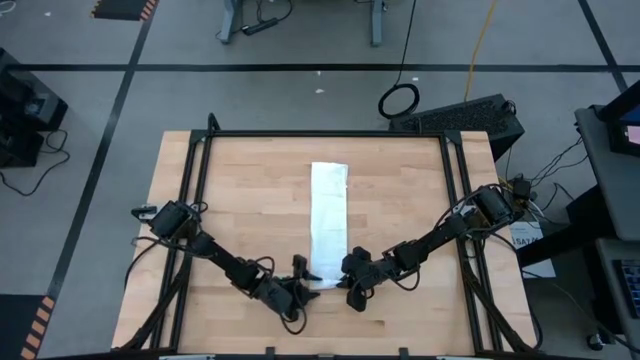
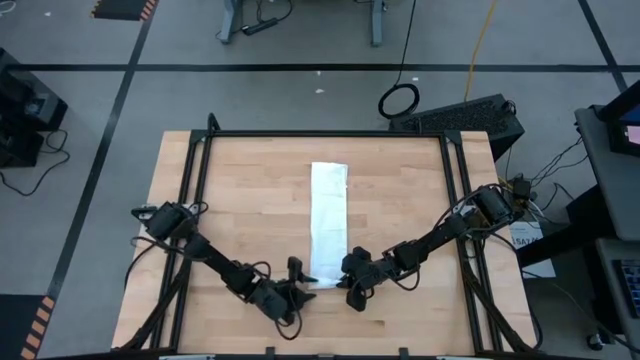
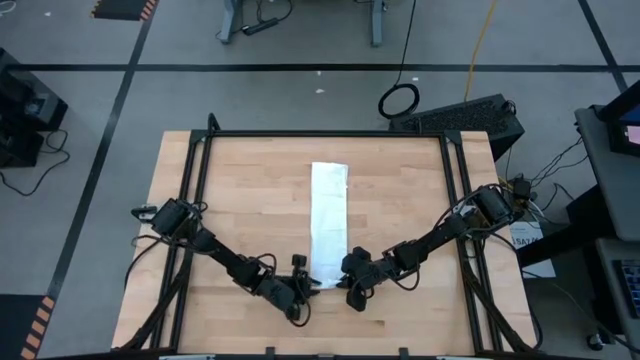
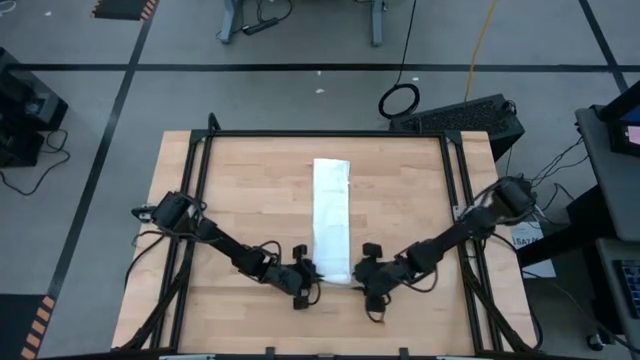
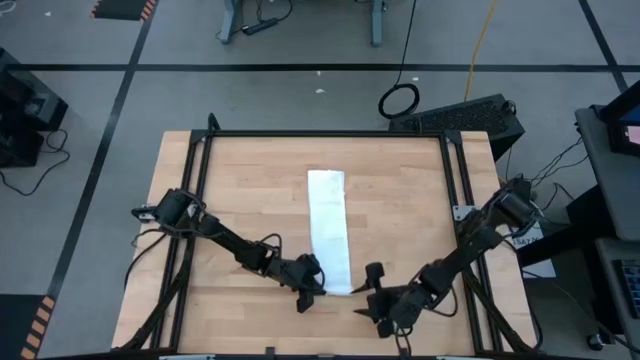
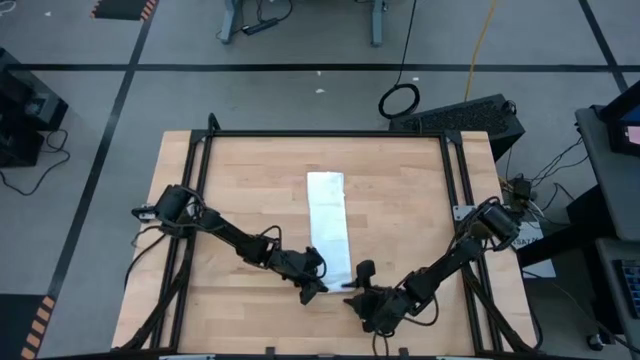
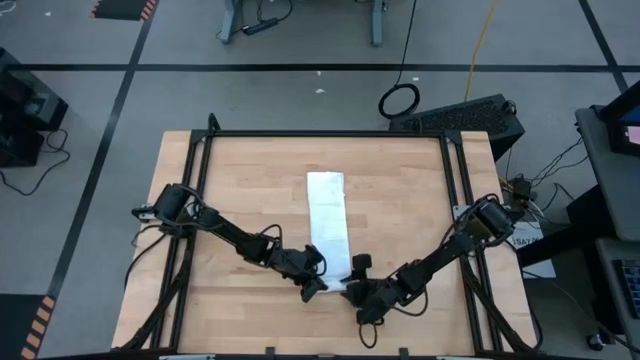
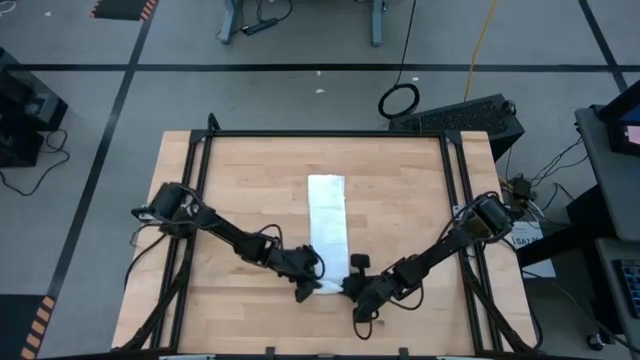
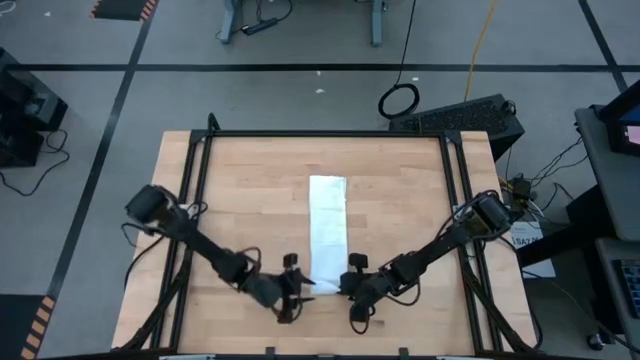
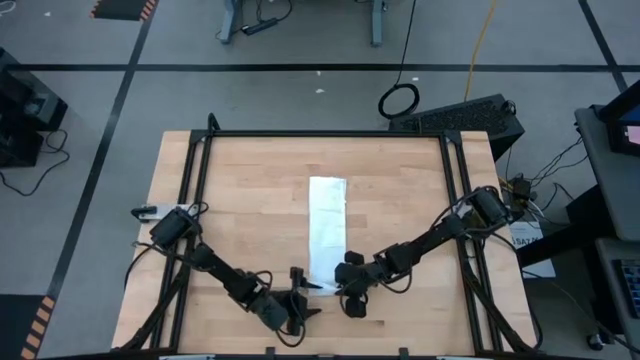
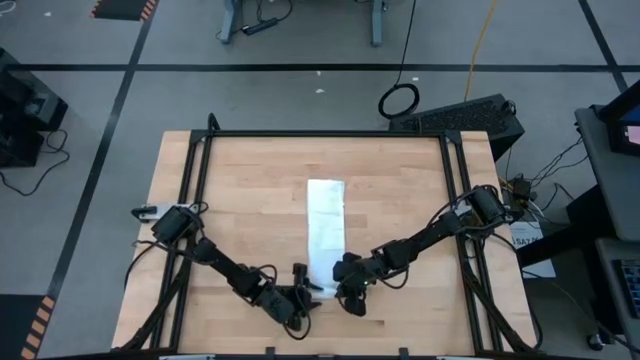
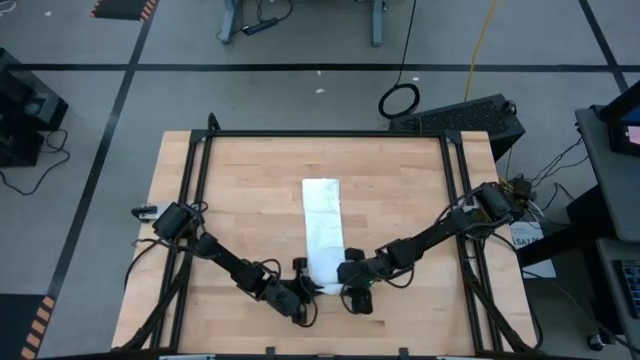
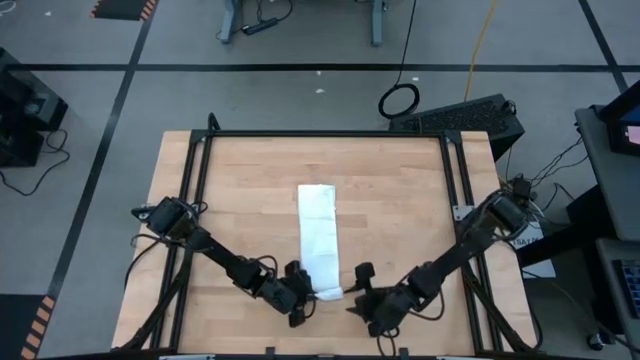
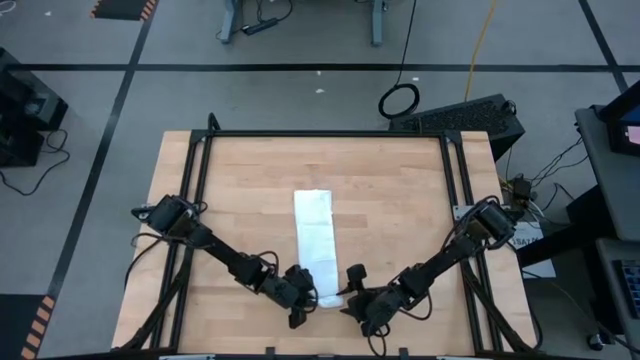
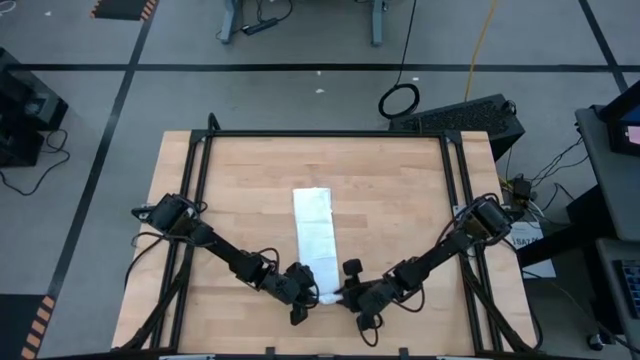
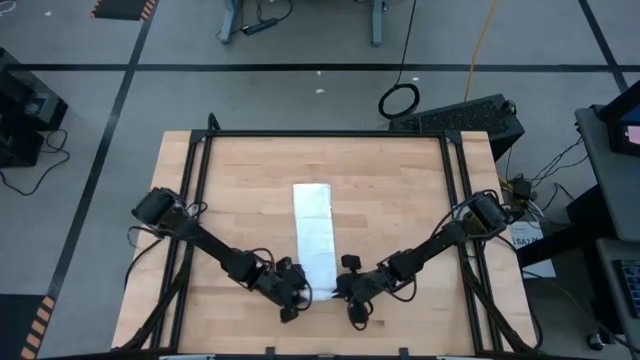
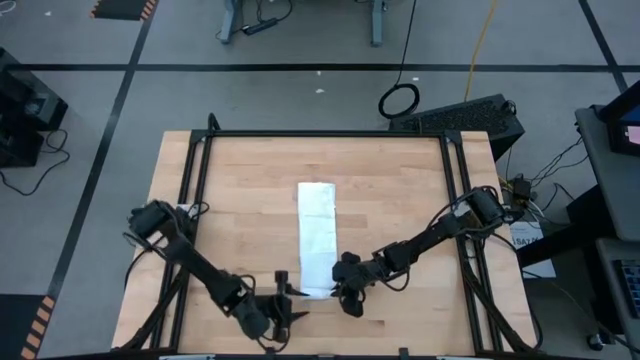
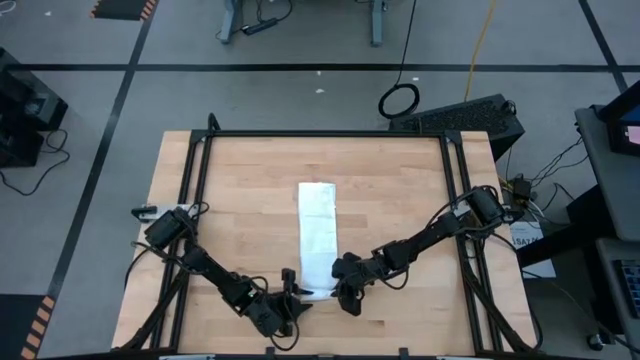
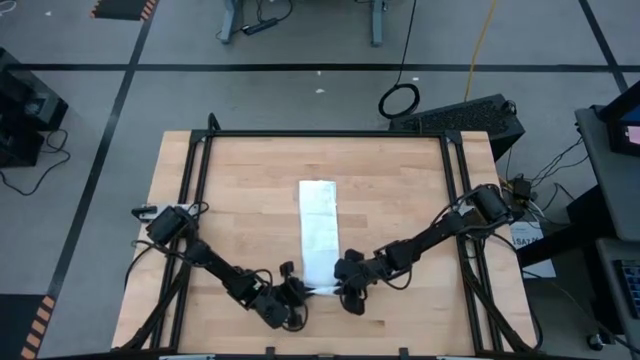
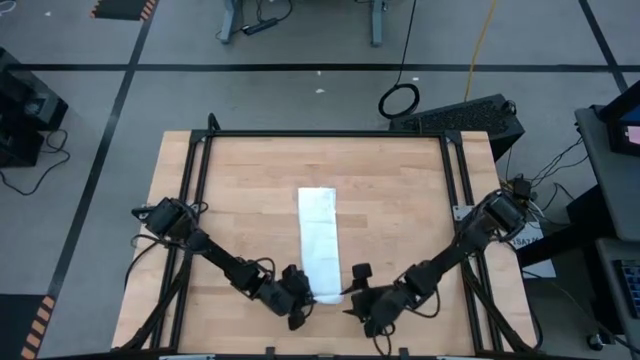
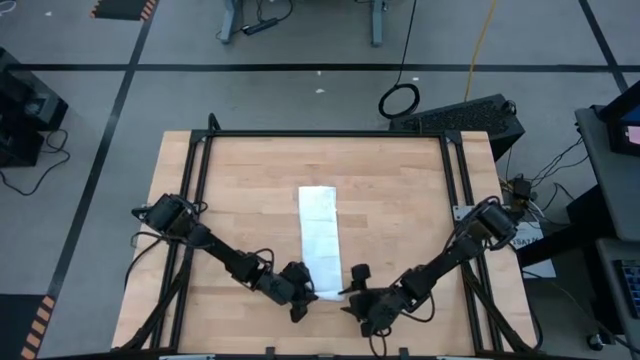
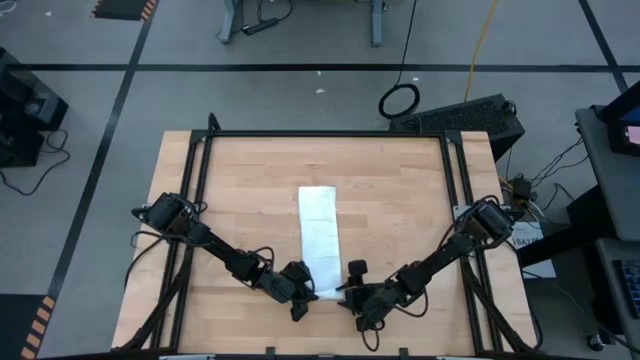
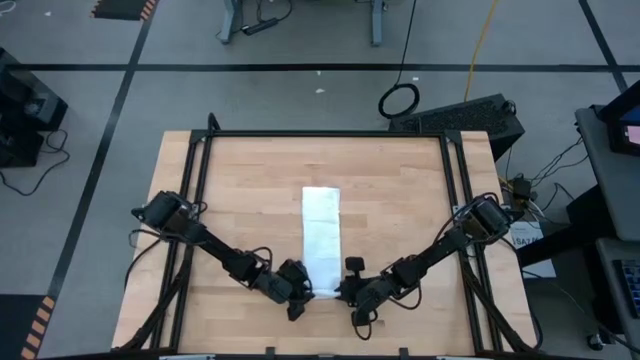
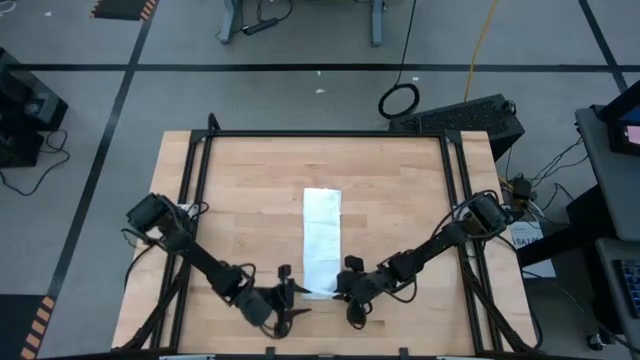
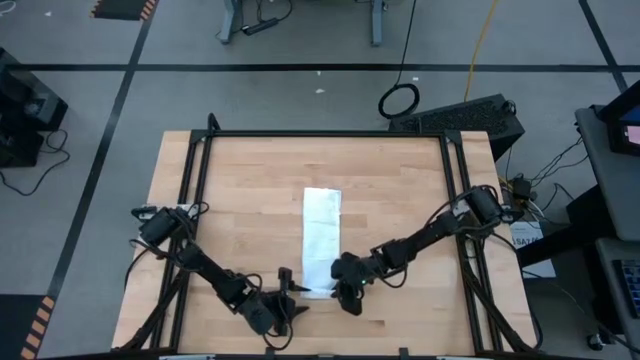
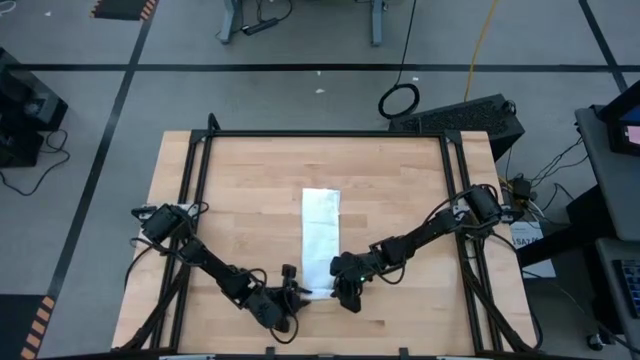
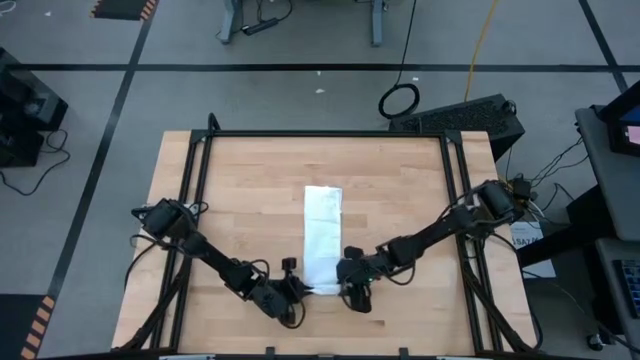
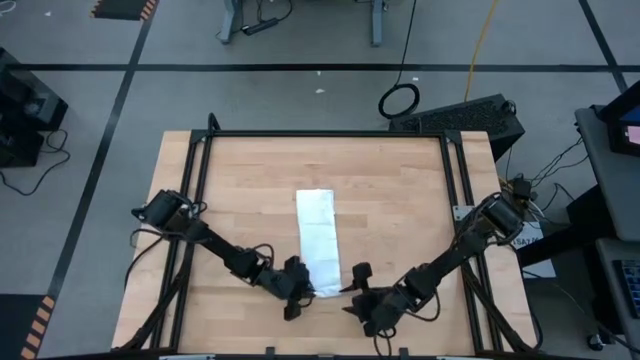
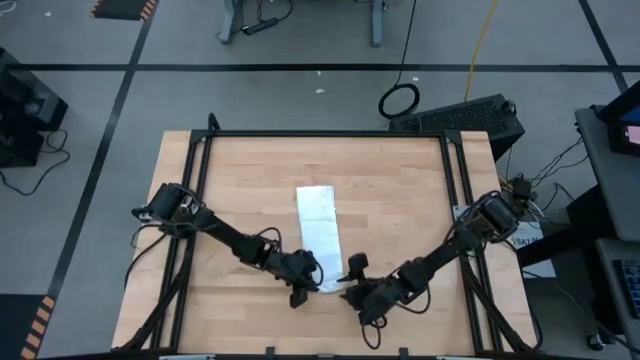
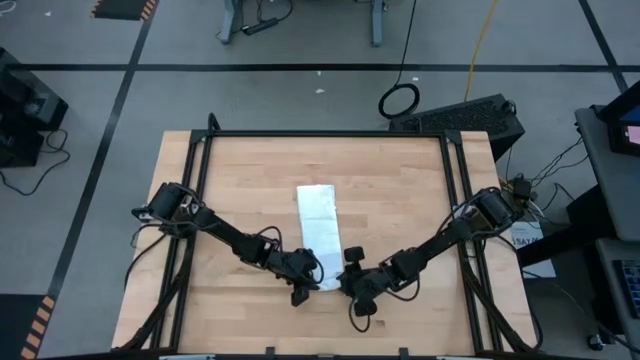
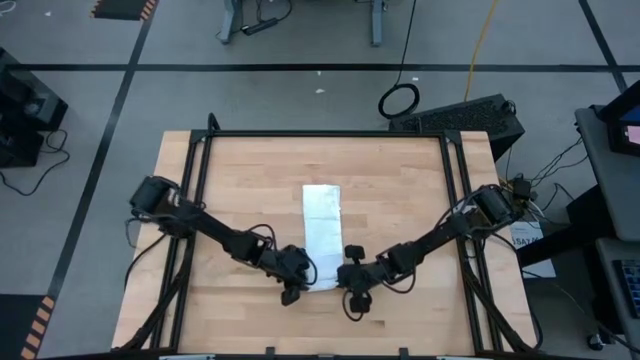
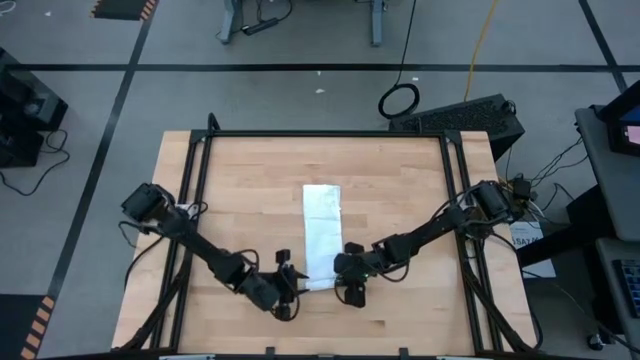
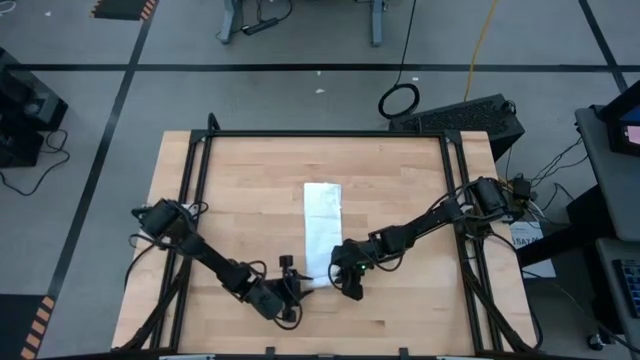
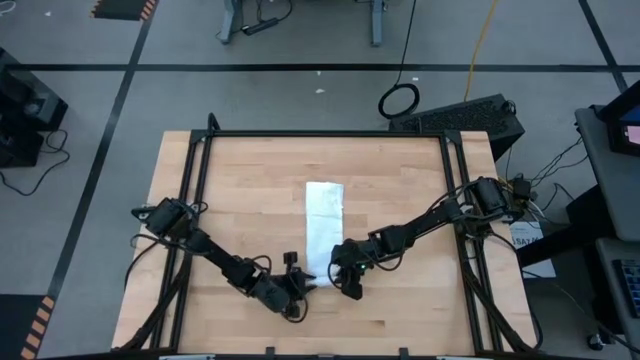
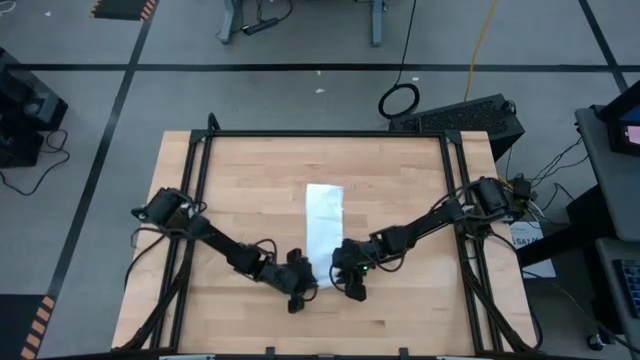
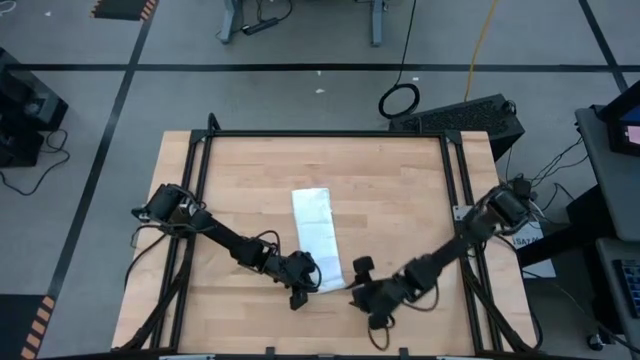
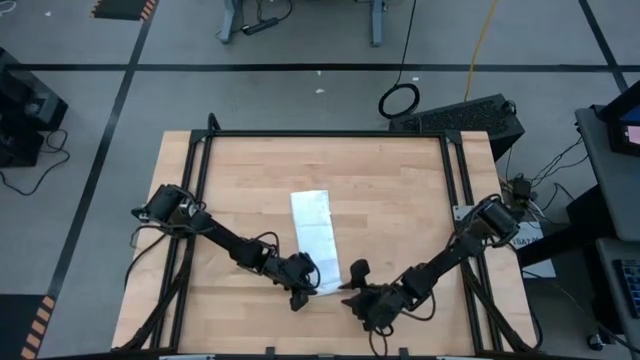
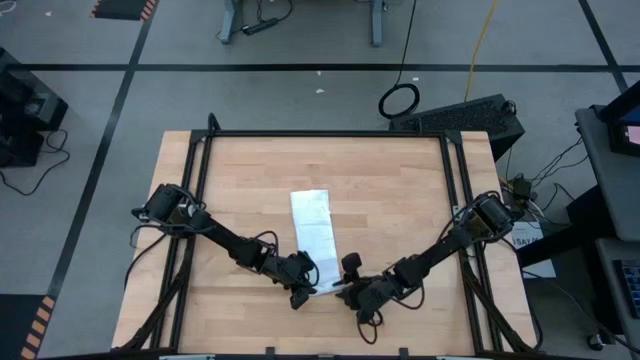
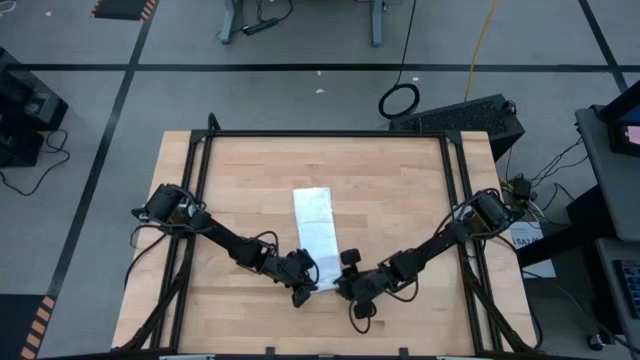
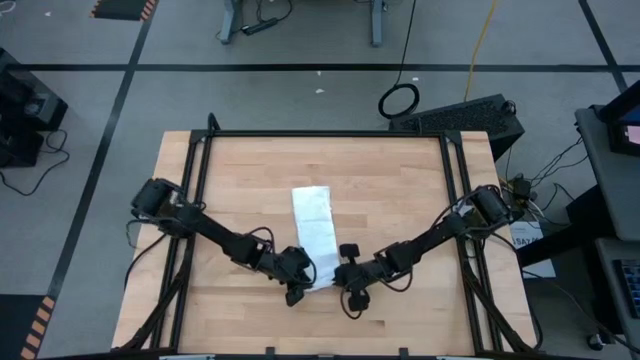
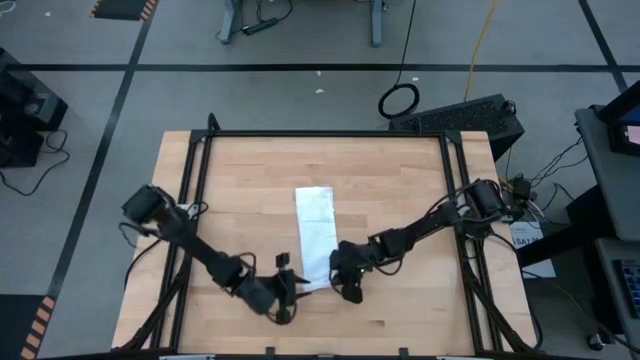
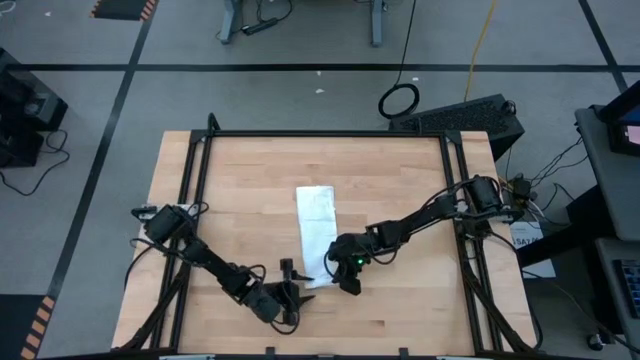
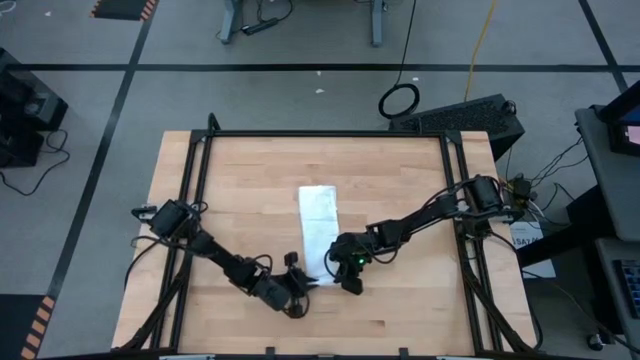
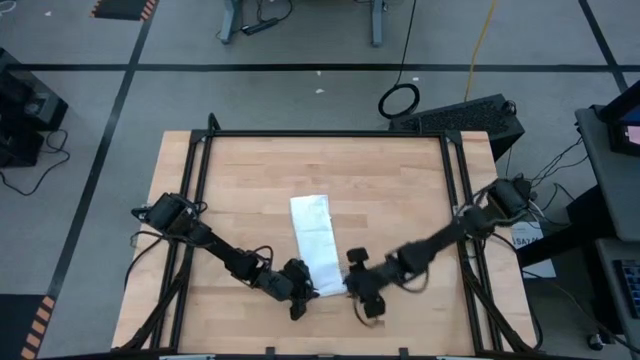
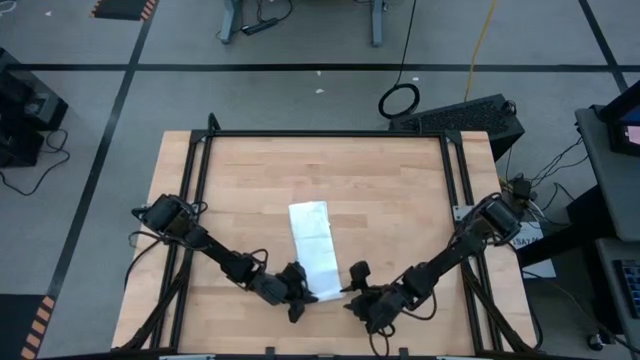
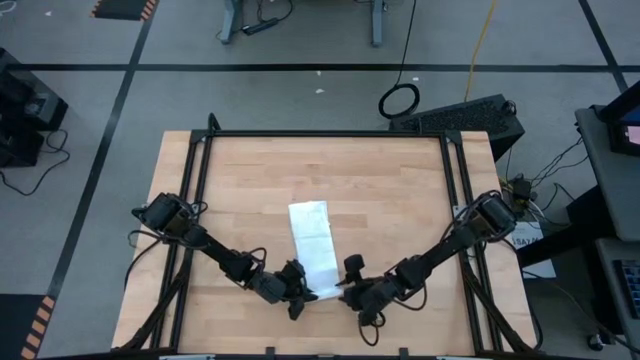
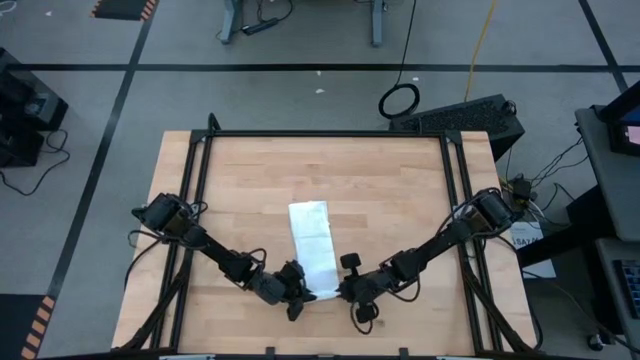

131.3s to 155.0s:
Task: Roll napkin
Roll the white table napkin
